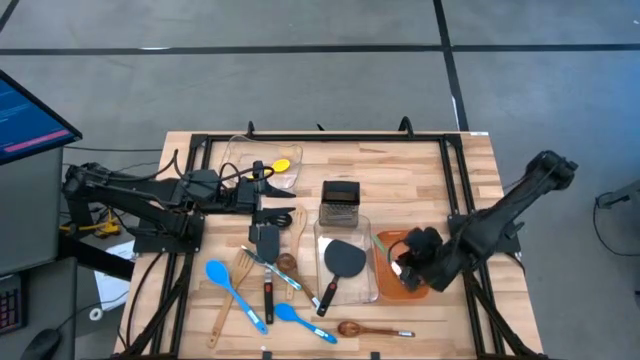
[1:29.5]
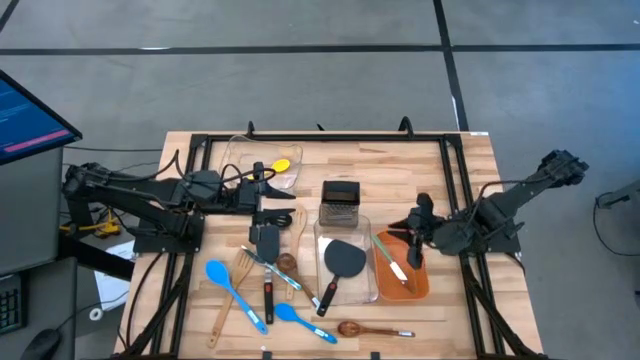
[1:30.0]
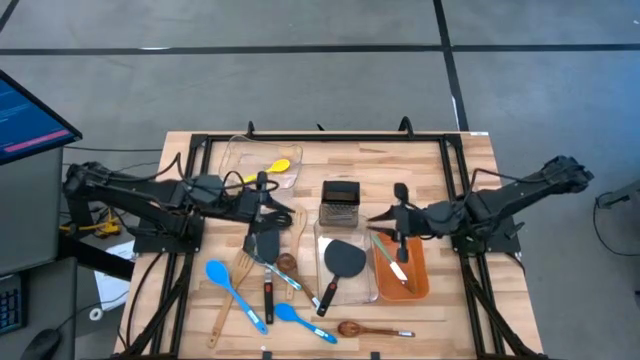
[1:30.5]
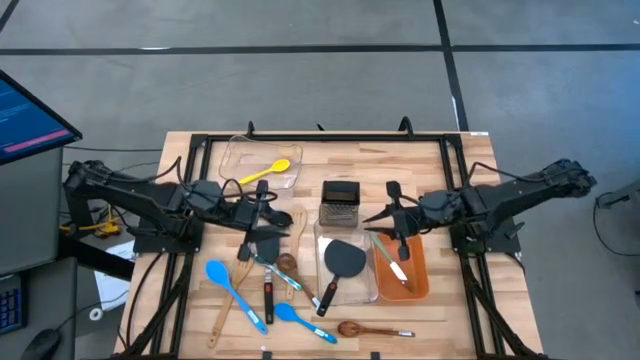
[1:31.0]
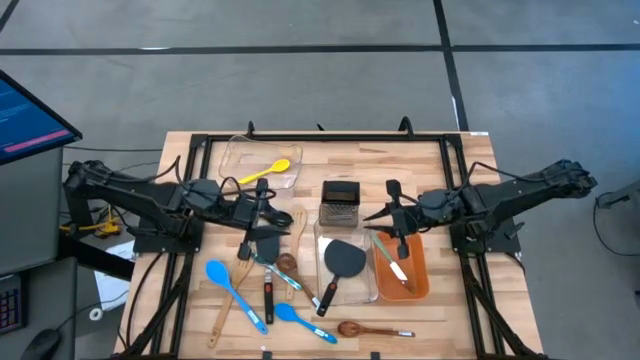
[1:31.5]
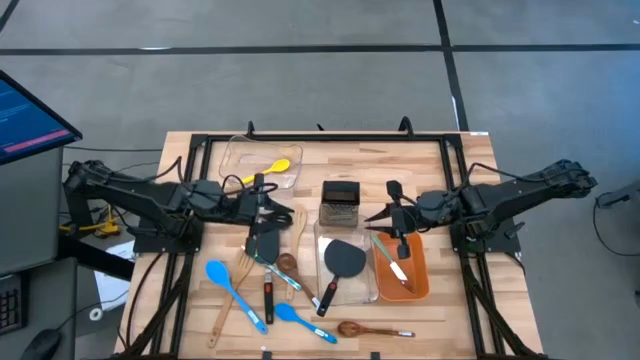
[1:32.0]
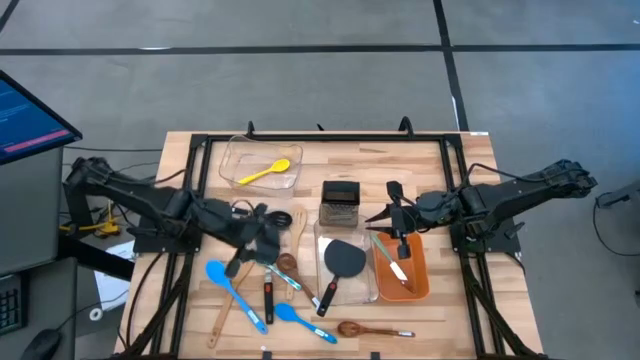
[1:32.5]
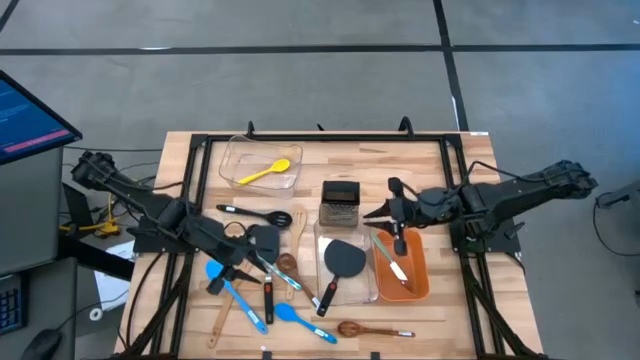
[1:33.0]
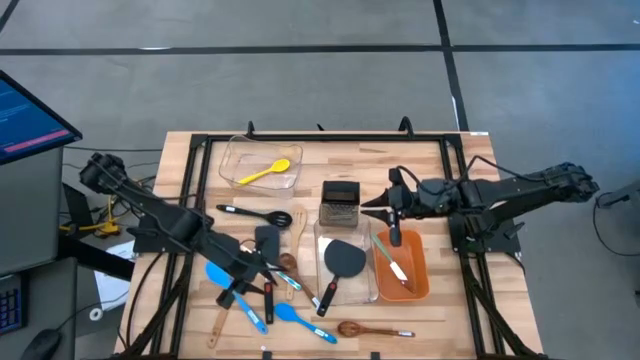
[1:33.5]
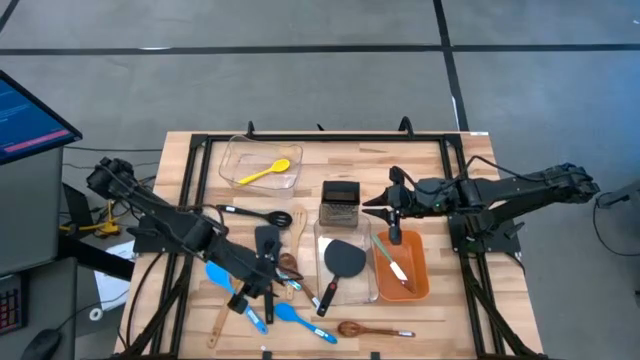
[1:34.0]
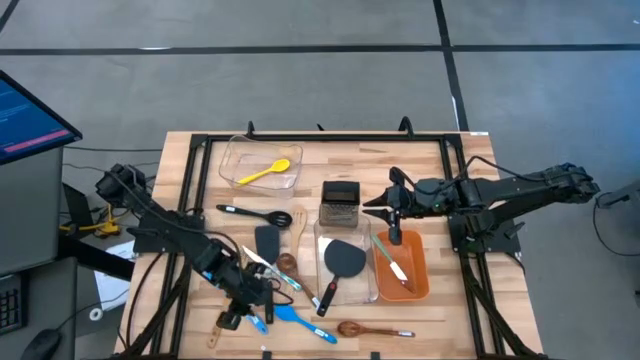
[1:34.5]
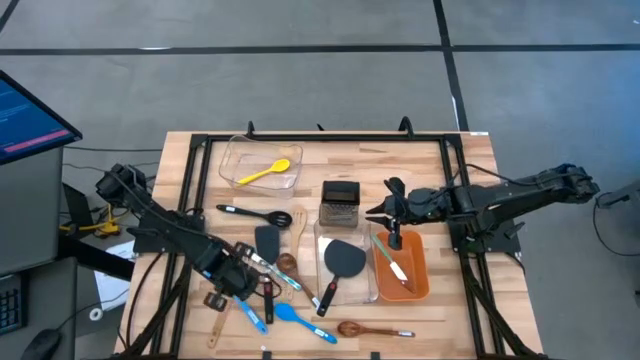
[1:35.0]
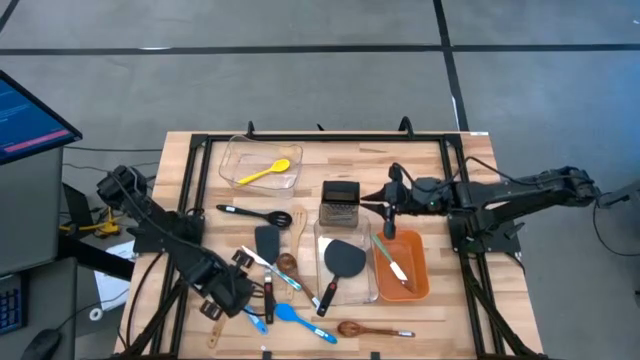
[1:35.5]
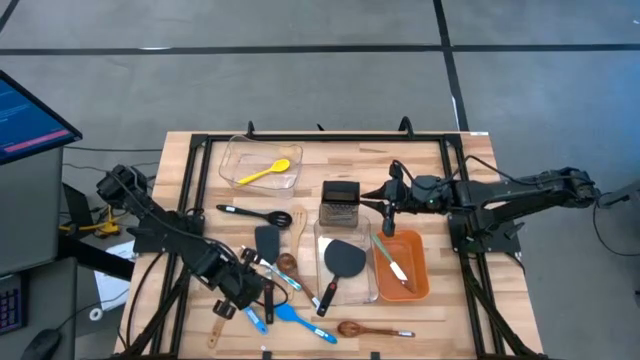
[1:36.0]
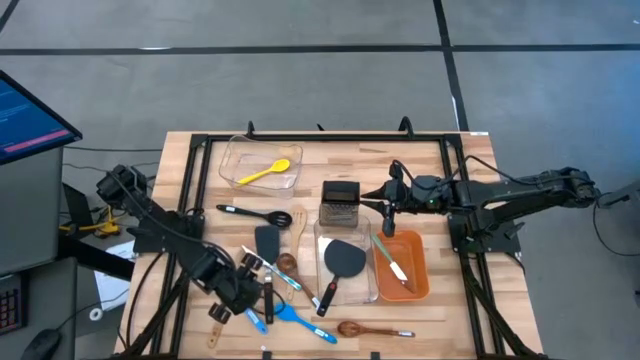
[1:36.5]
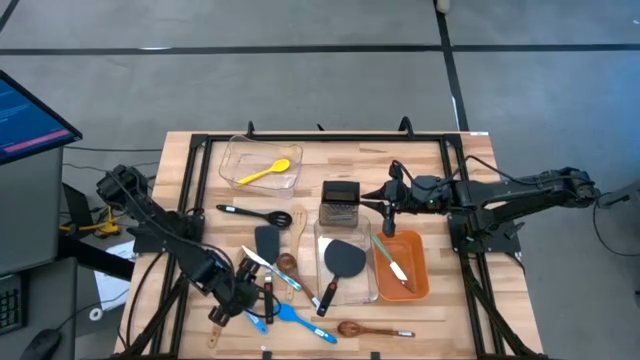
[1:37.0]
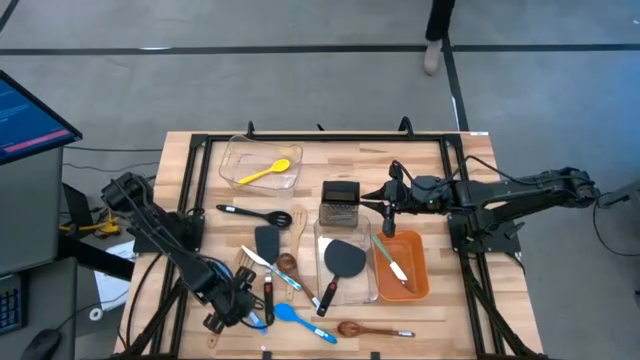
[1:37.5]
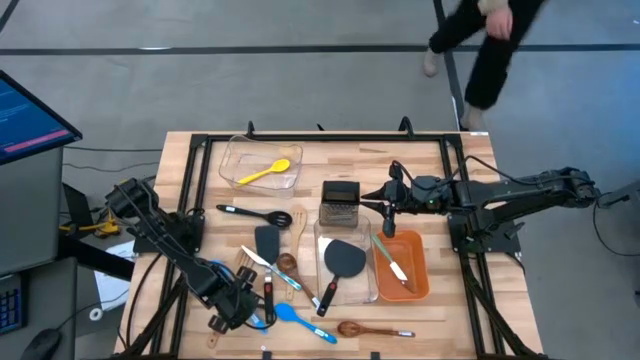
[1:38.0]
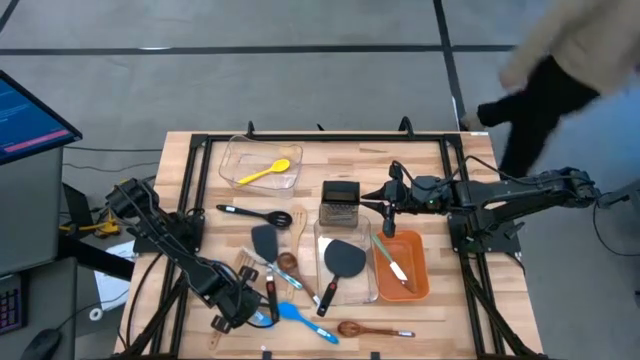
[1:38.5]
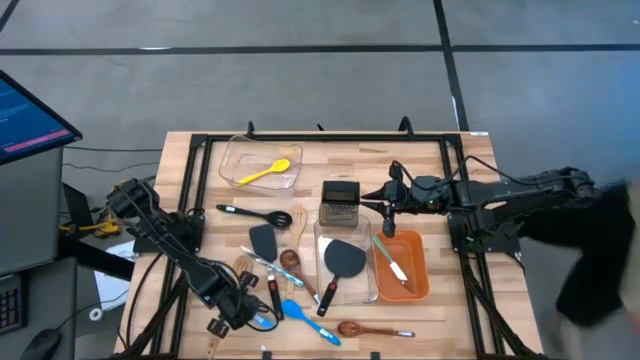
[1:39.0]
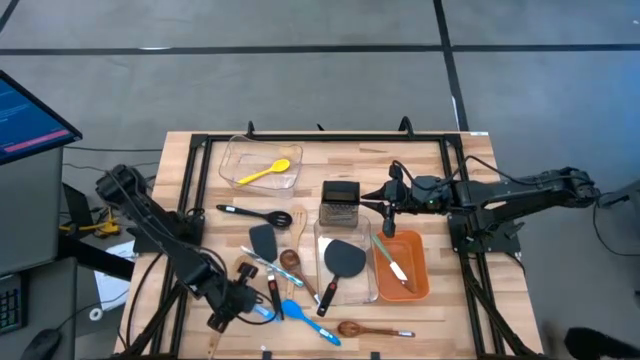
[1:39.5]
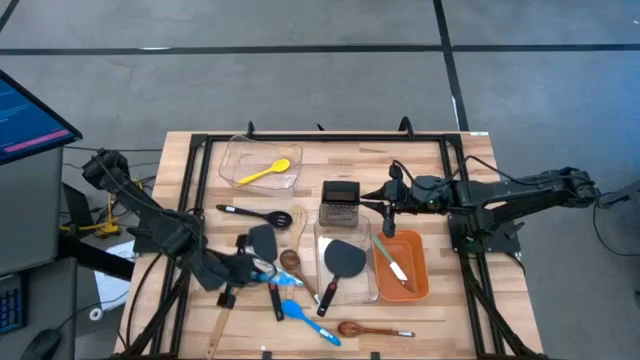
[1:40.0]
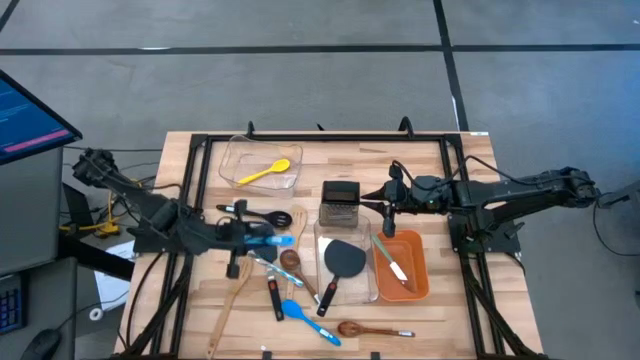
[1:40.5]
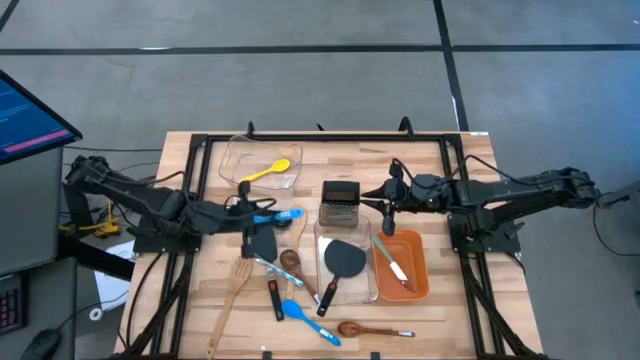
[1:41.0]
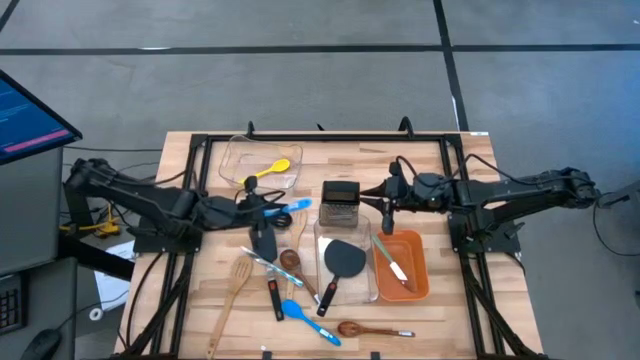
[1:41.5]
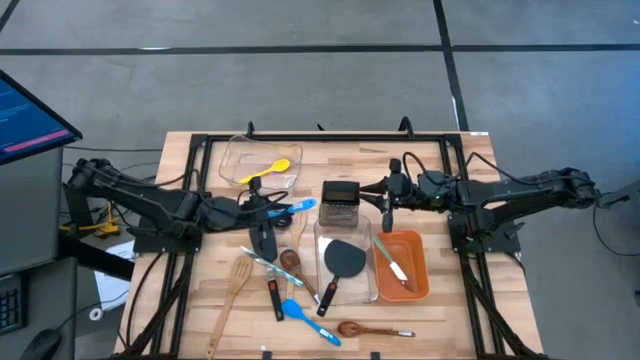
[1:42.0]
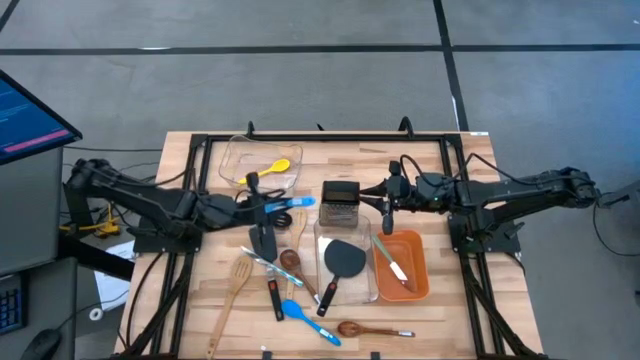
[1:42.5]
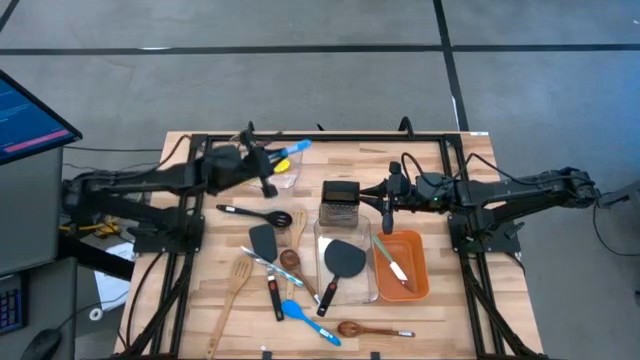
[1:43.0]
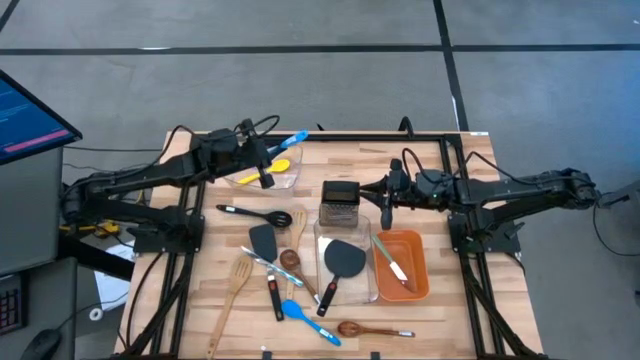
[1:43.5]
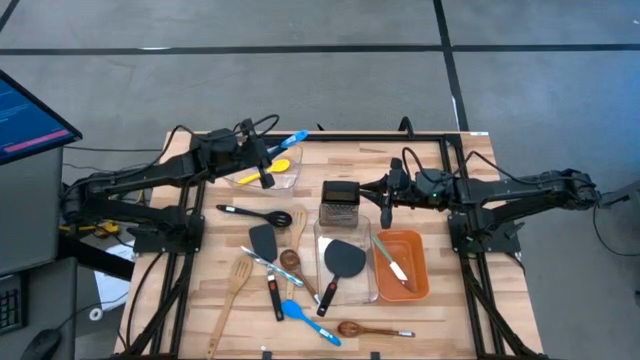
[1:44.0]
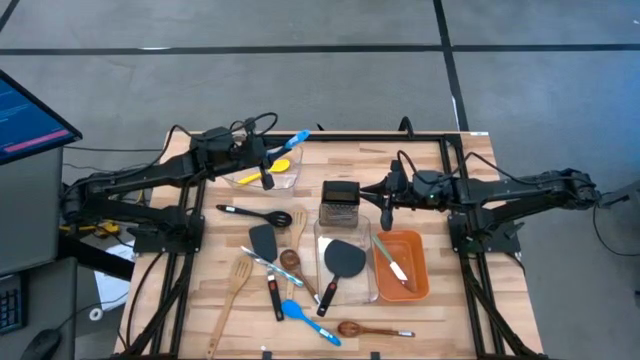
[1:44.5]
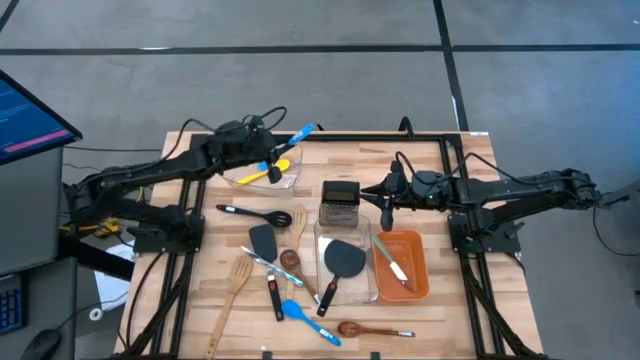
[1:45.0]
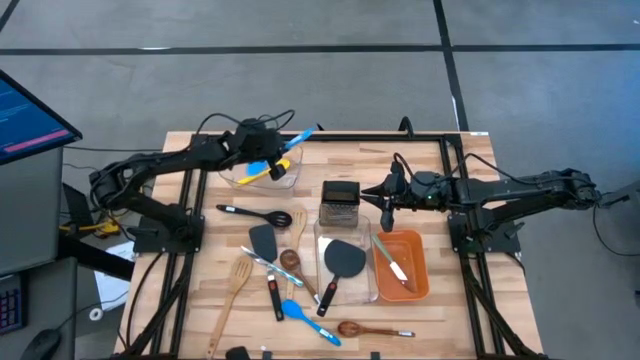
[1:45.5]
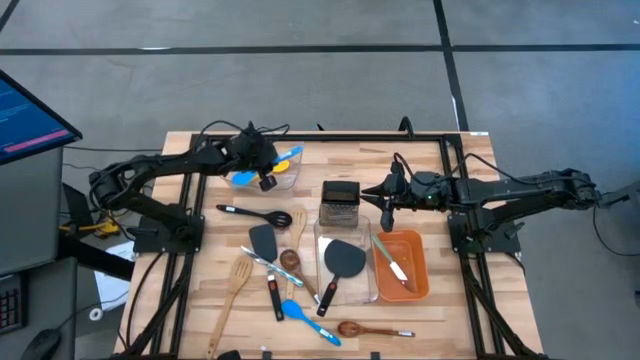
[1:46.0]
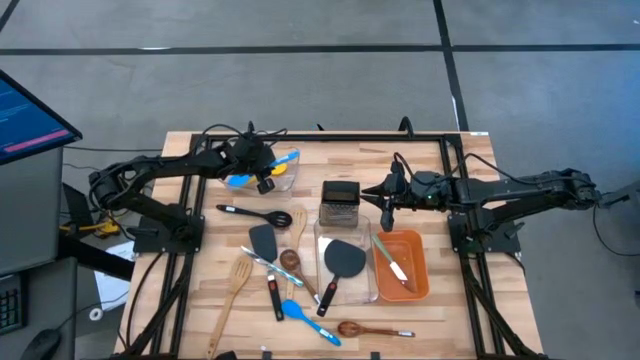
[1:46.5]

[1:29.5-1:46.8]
Task: Pick & Place Kitchen Items
Put the light blue ladles into the top transparent bin

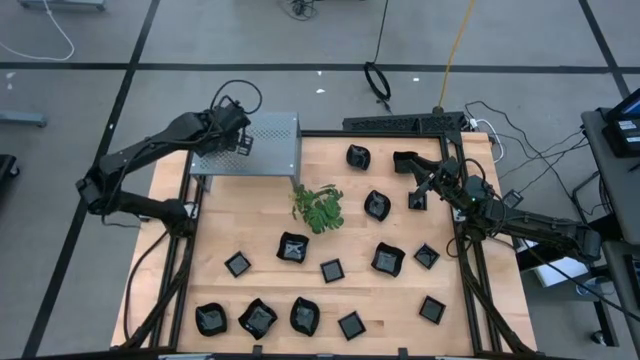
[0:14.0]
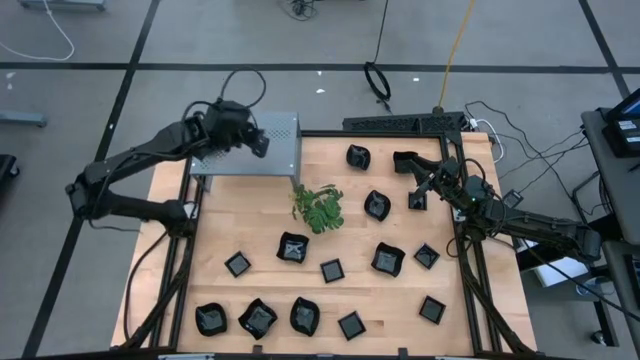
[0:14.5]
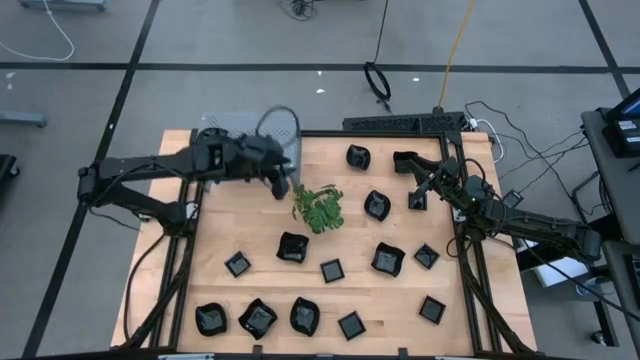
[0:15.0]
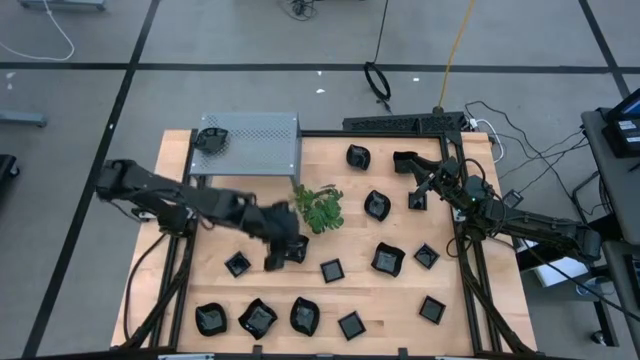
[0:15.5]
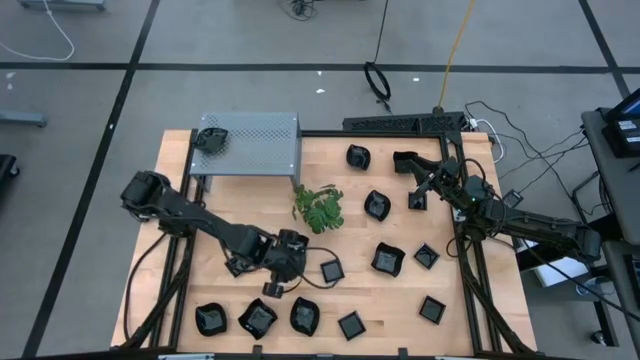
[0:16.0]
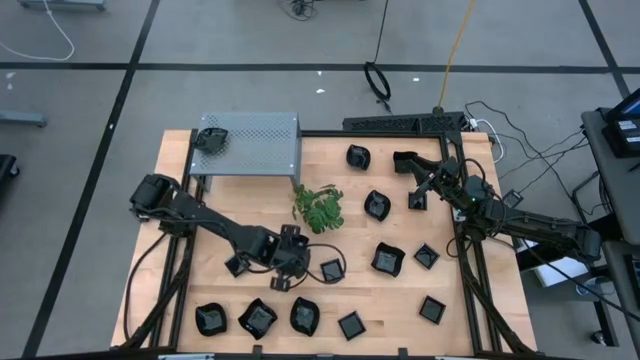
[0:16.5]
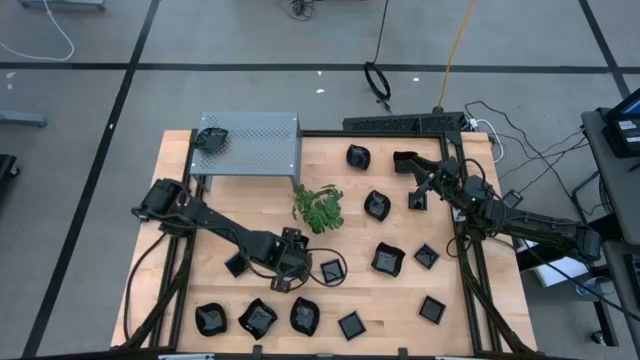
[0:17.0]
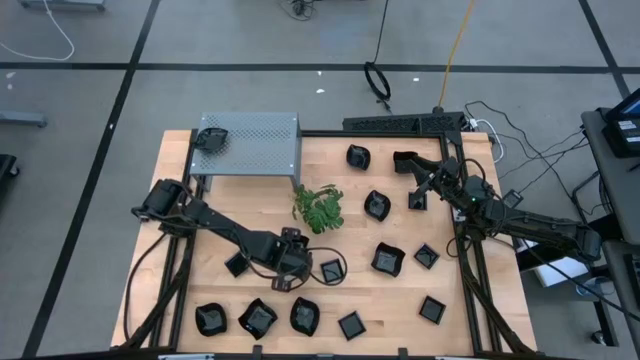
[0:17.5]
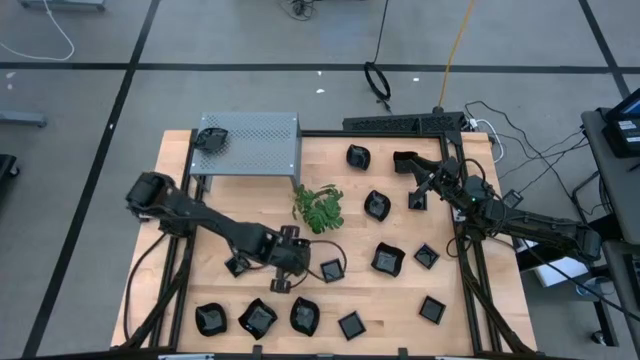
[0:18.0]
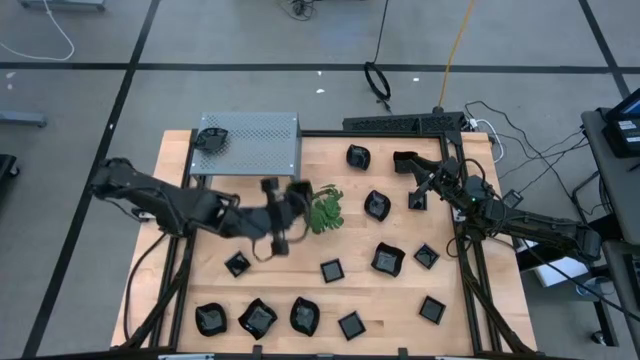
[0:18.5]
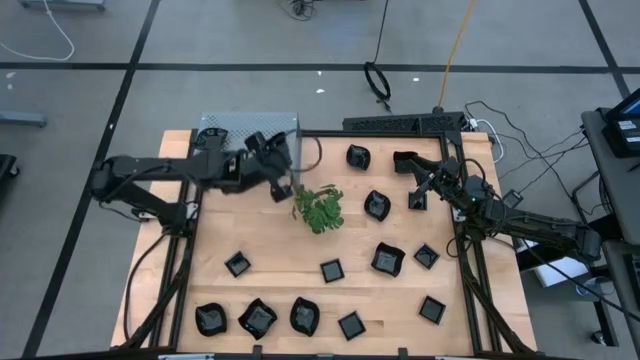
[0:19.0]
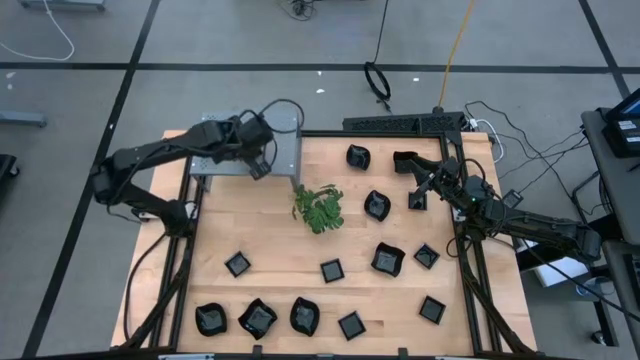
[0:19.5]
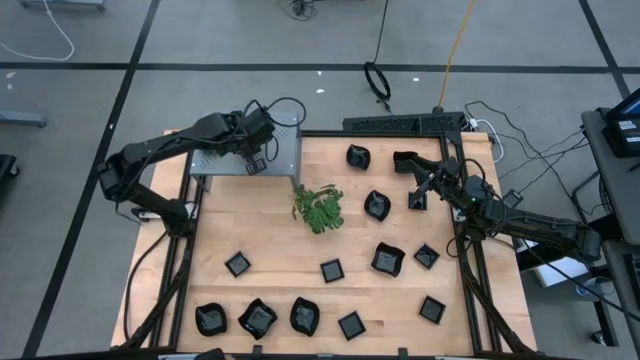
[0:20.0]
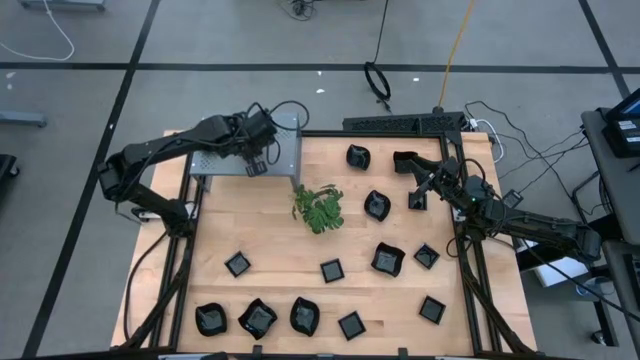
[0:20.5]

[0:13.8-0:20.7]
Task: Pick & Place Mini shaped plates
Put the distorted square plate on the shelf
